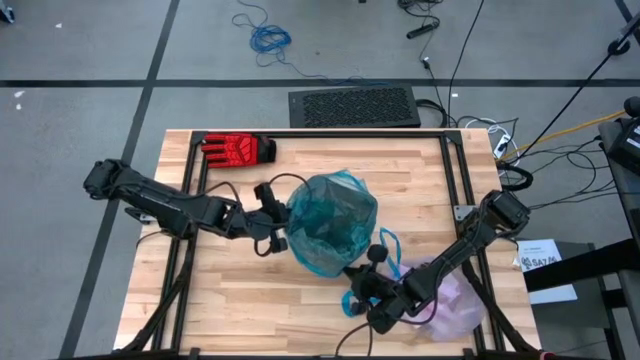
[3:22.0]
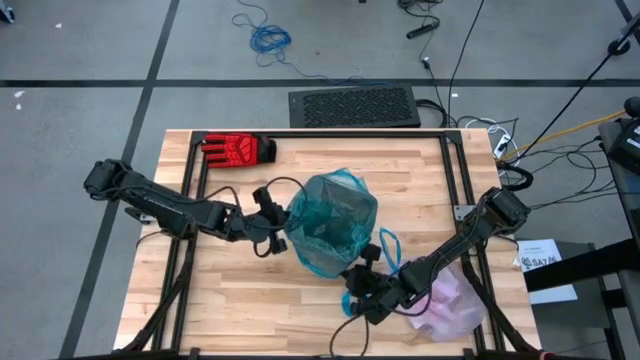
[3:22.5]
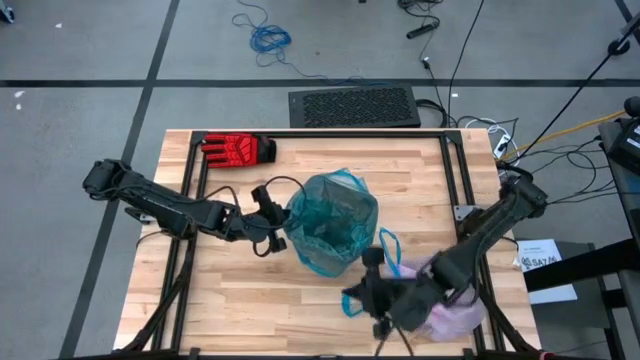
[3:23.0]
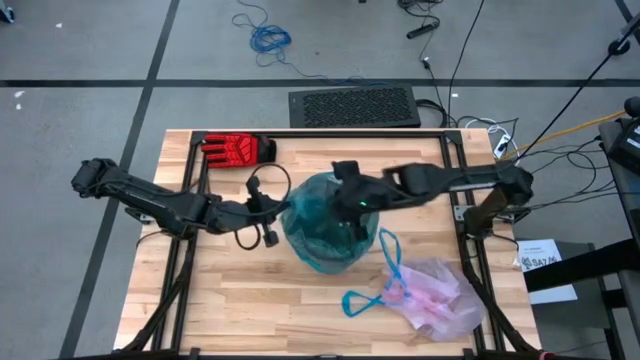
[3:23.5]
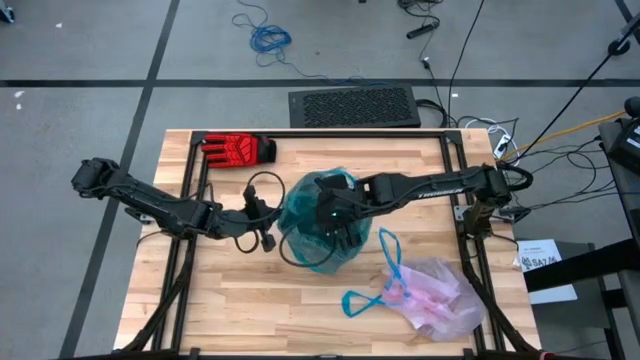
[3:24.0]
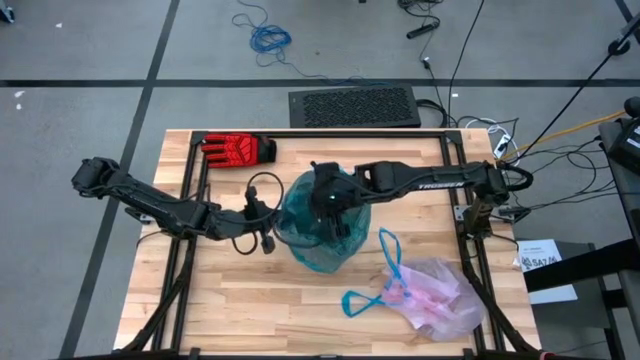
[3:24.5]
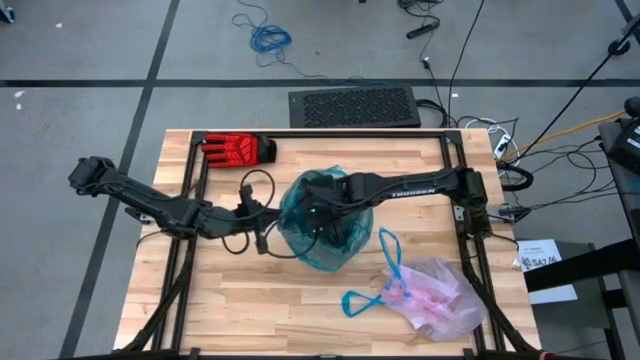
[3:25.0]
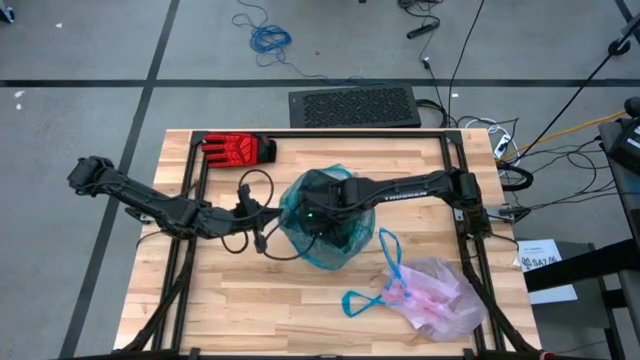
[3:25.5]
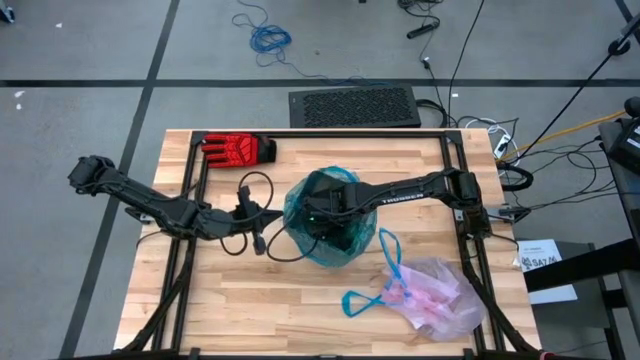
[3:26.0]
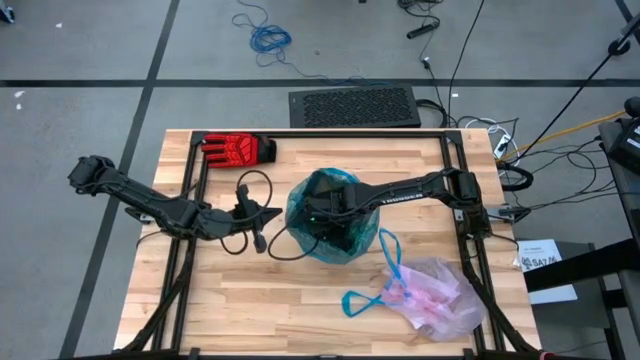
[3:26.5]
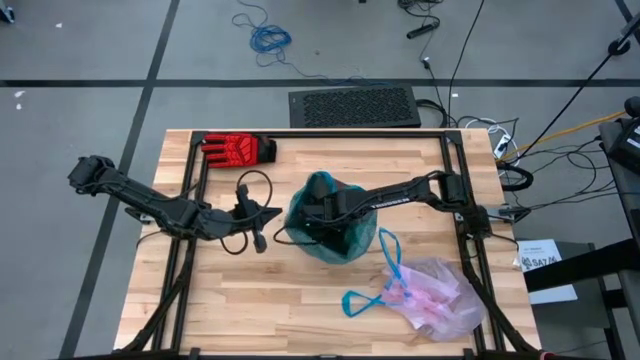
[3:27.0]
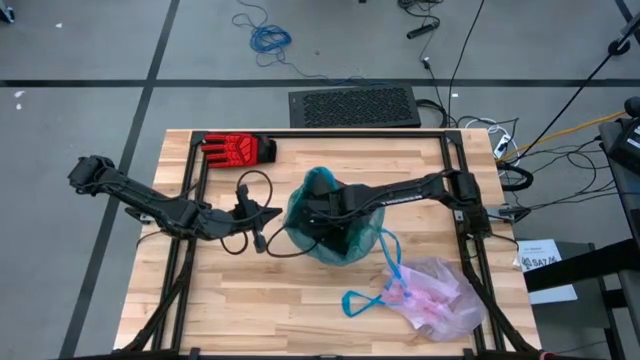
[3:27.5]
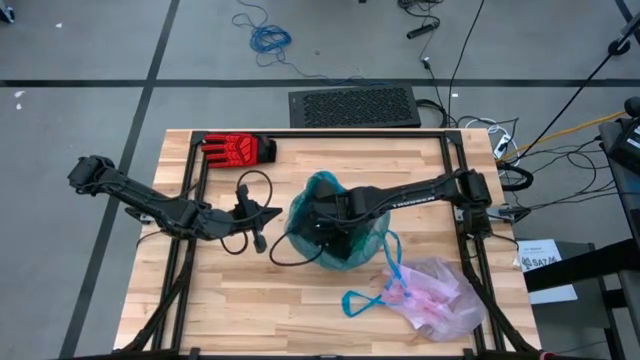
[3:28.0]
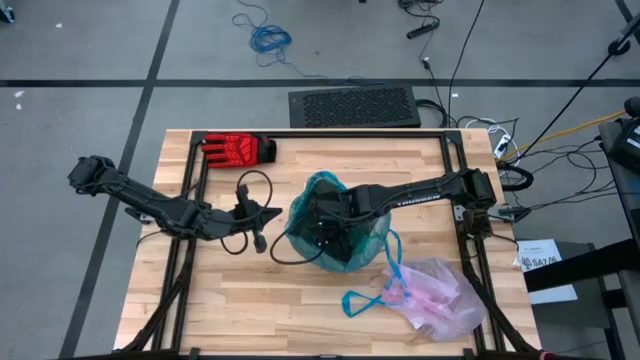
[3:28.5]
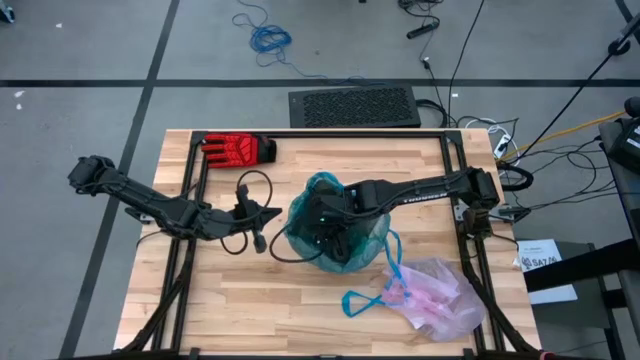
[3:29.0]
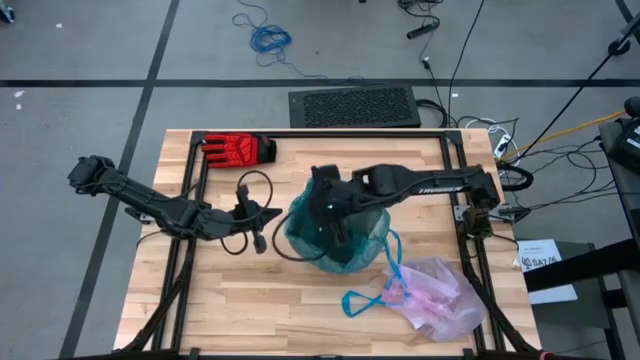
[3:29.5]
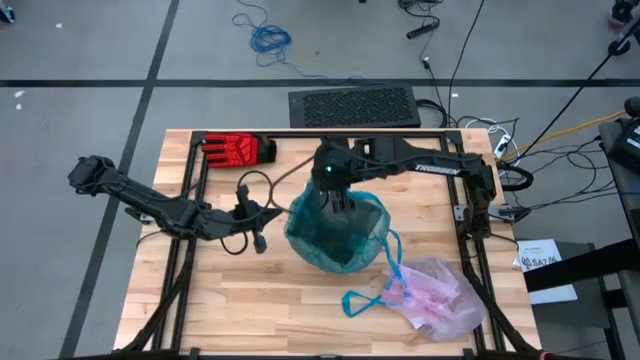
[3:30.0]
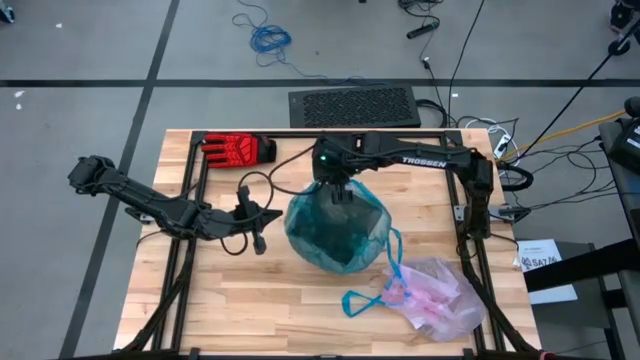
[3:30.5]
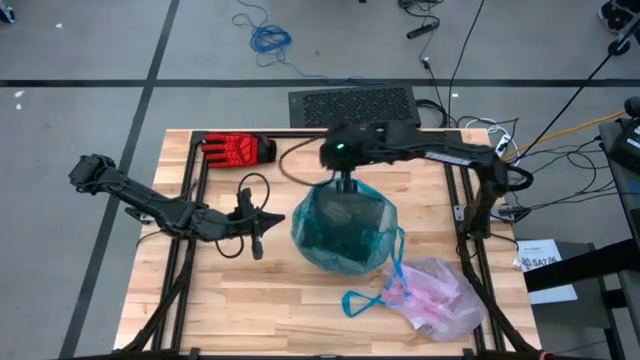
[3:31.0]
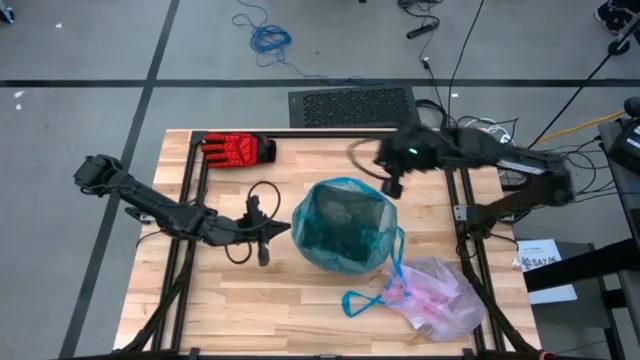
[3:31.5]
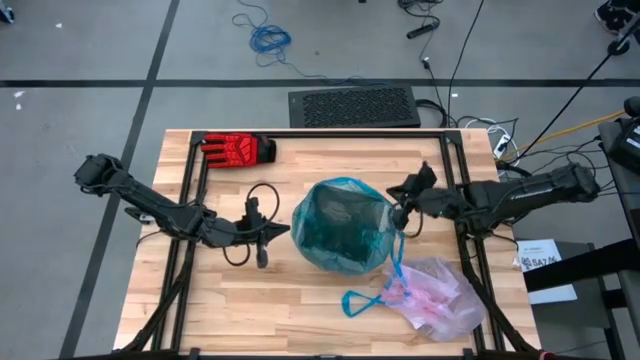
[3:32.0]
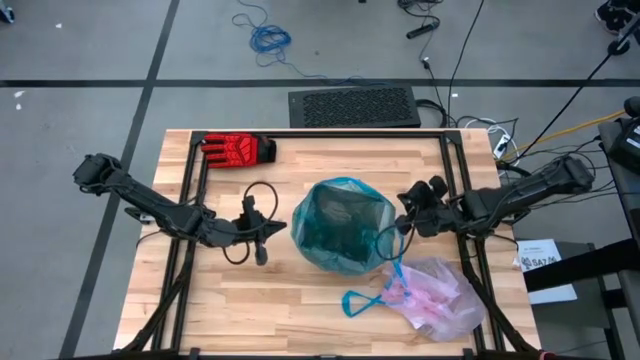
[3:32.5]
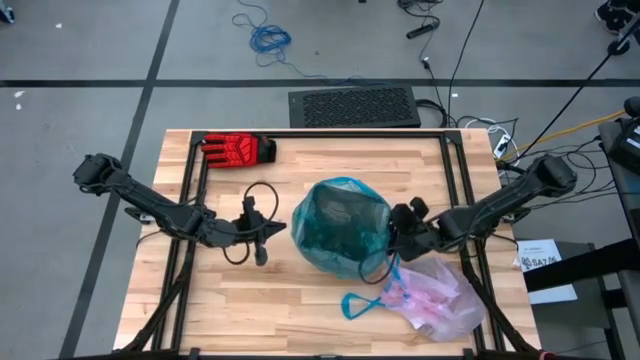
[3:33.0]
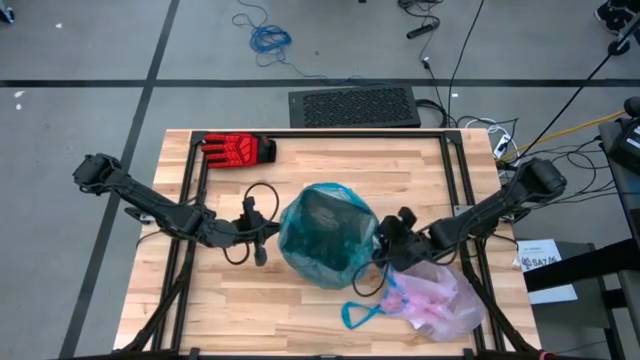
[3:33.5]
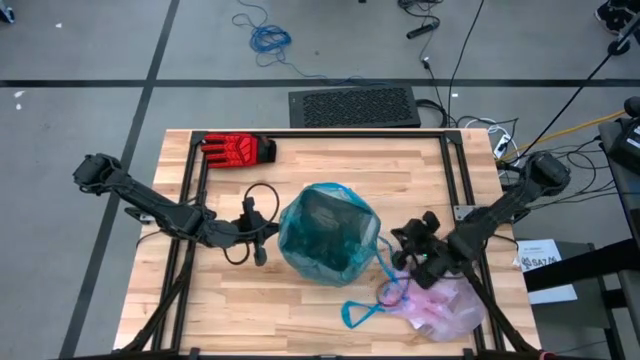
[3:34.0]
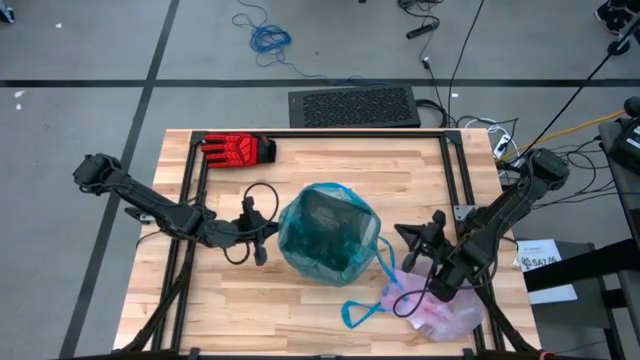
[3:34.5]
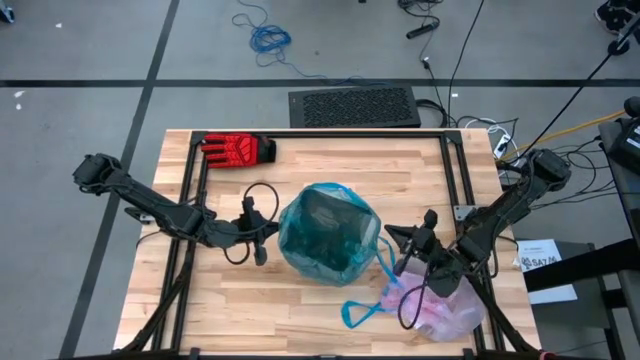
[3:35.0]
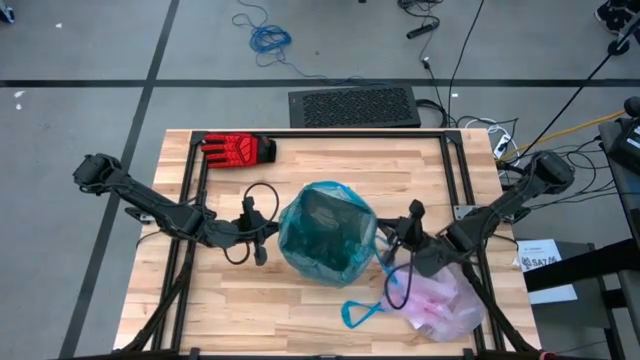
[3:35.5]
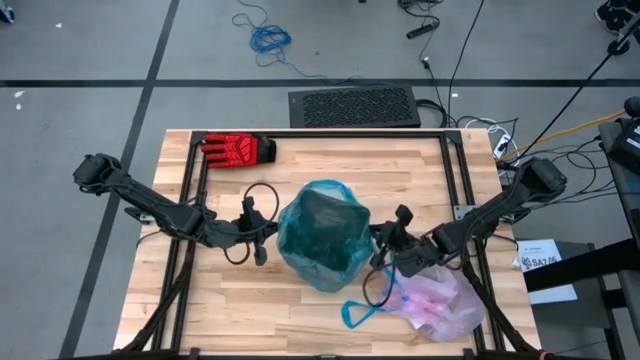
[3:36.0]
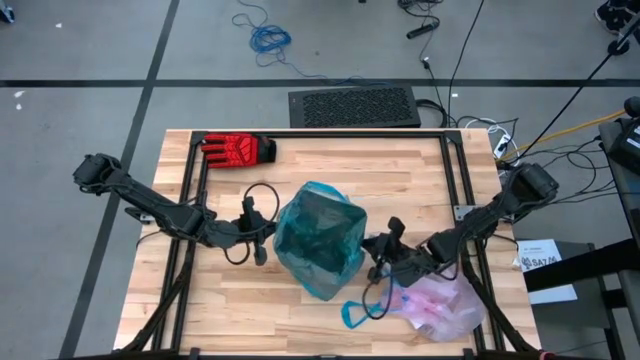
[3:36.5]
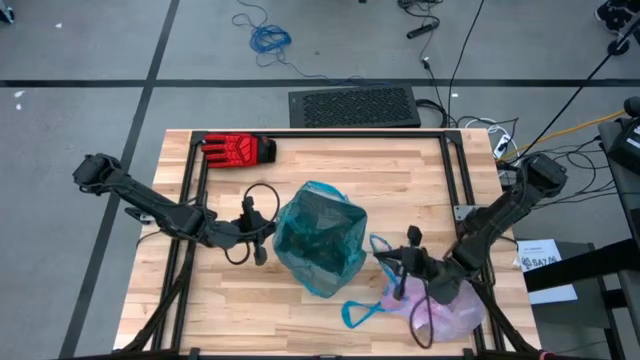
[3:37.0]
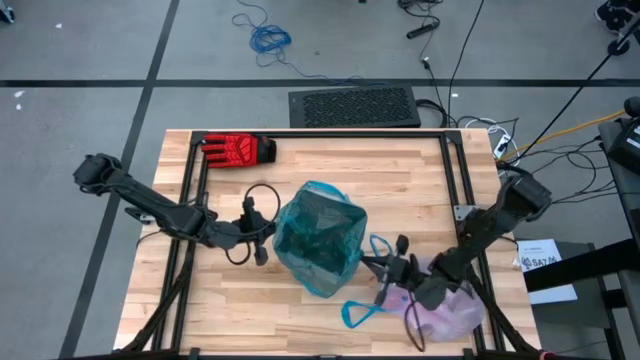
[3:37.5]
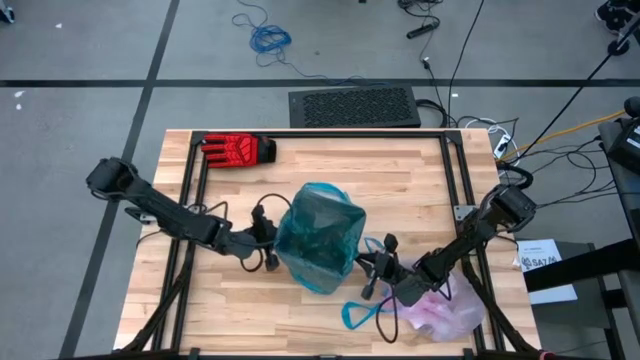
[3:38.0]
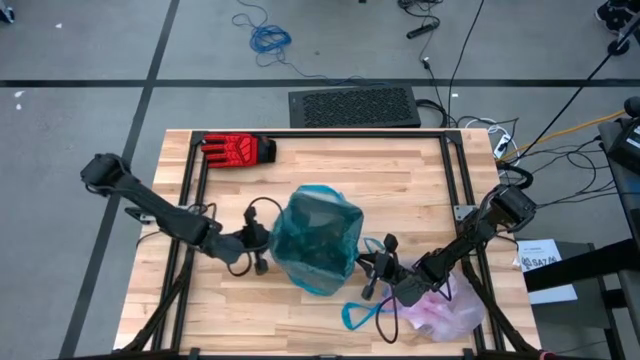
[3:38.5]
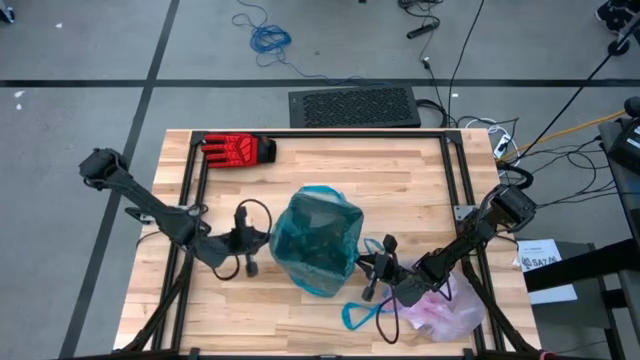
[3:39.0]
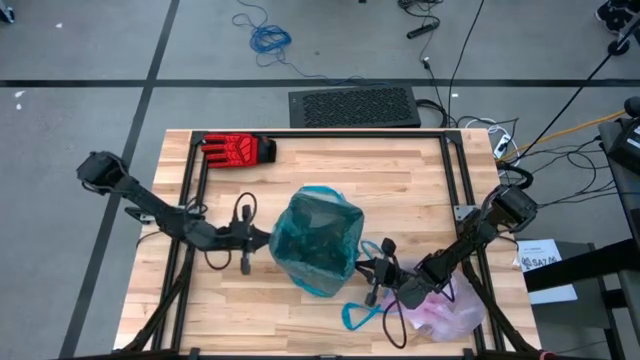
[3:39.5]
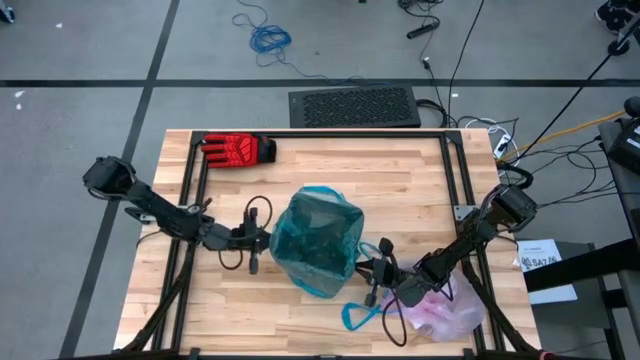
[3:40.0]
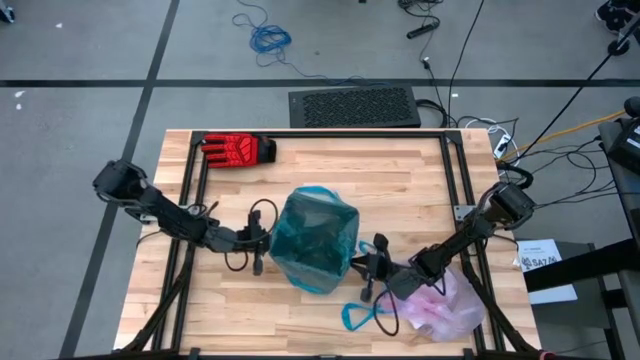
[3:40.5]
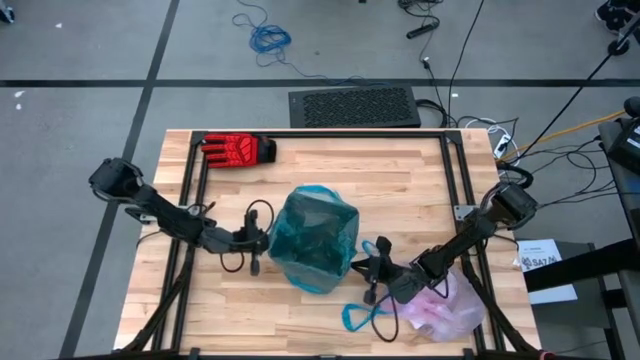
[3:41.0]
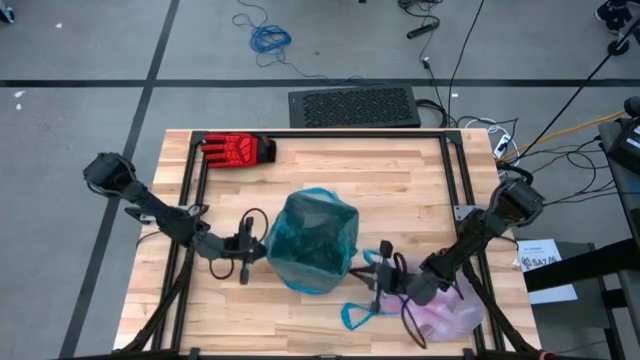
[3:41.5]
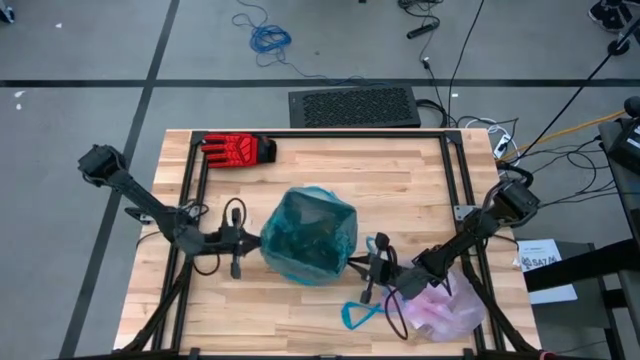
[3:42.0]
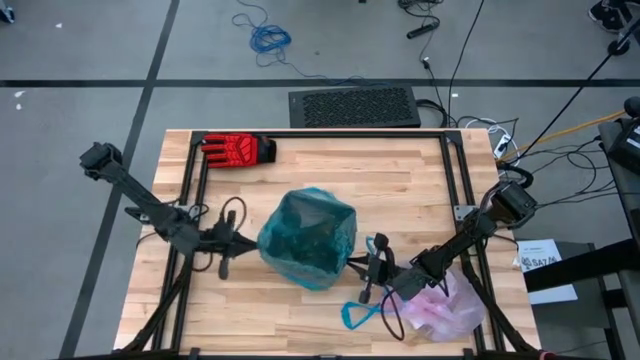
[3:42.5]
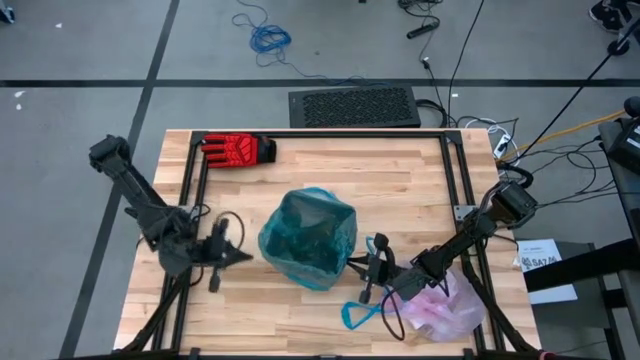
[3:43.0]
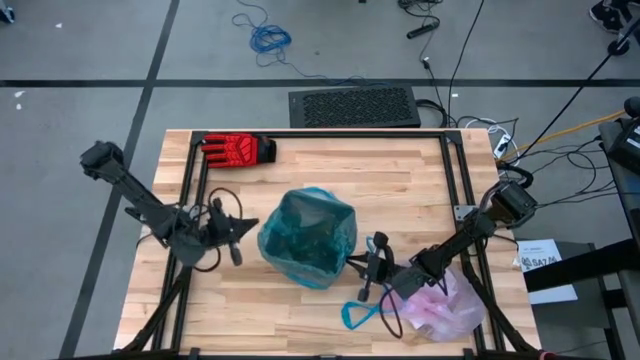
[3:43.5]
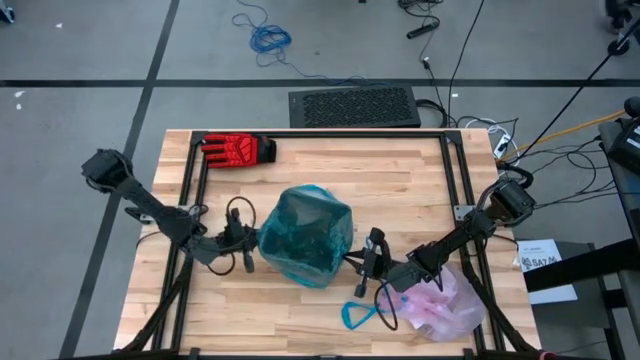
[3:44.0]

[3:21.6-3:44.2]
Task: place trash/remove bag and relplace
Insert the blue trash bag into the black trash bin
